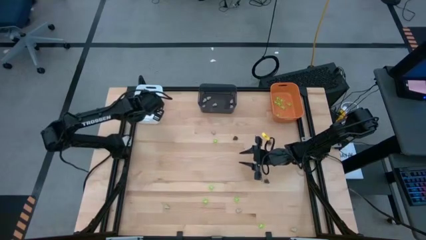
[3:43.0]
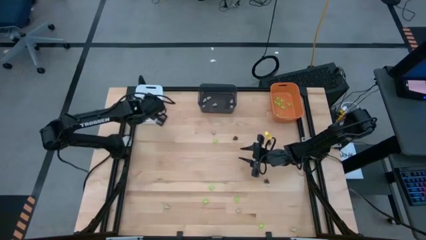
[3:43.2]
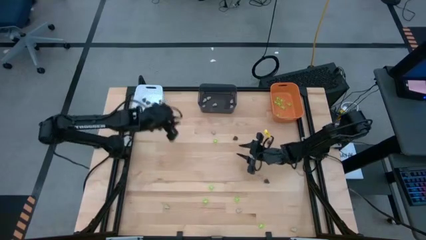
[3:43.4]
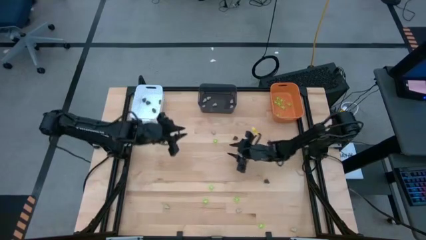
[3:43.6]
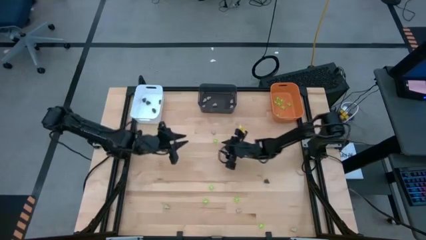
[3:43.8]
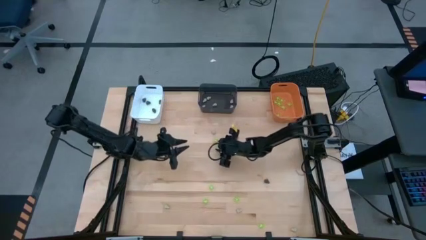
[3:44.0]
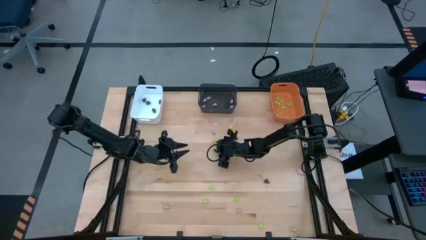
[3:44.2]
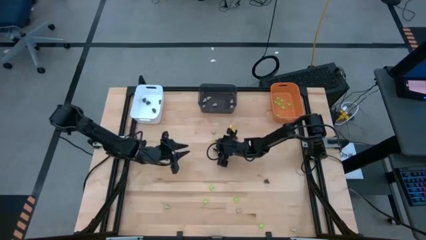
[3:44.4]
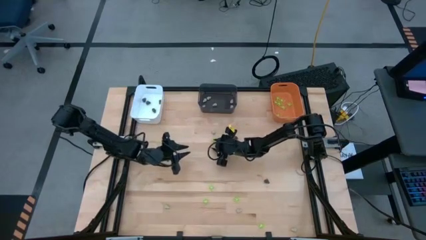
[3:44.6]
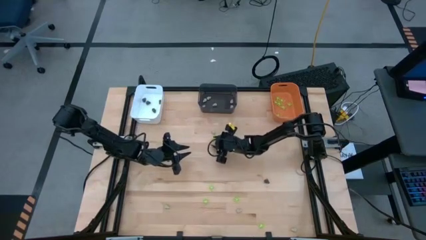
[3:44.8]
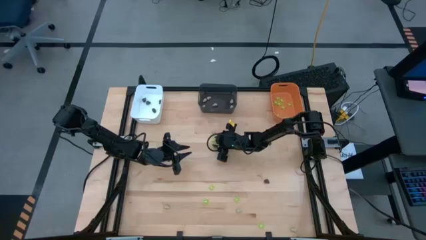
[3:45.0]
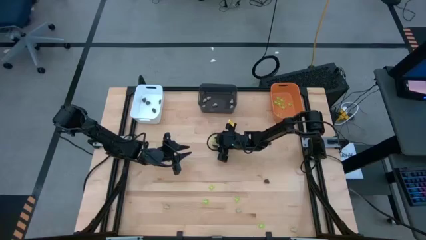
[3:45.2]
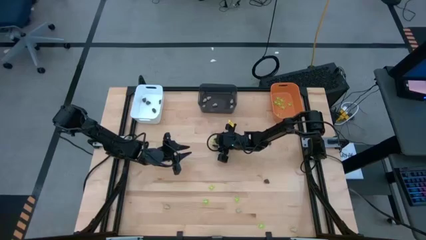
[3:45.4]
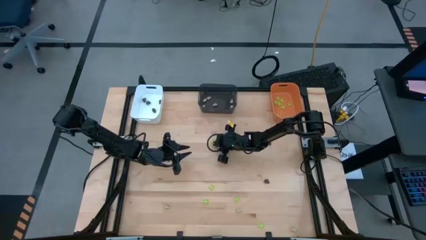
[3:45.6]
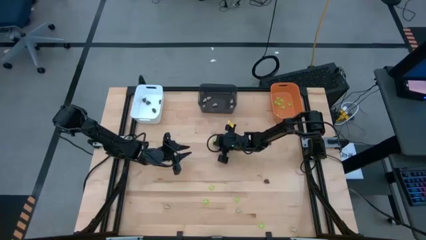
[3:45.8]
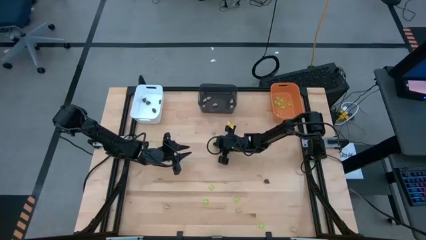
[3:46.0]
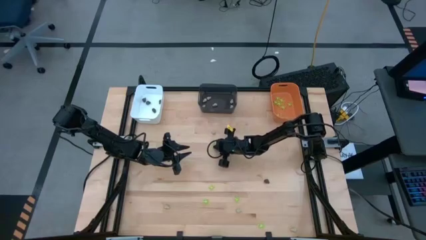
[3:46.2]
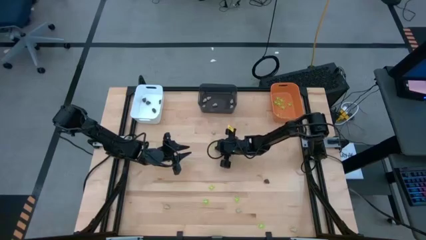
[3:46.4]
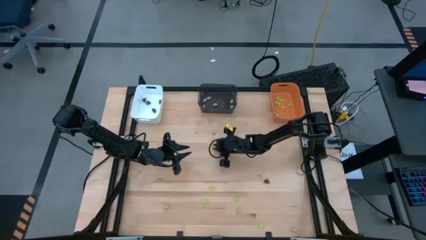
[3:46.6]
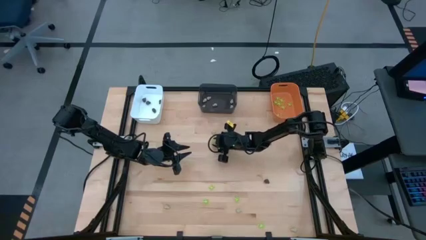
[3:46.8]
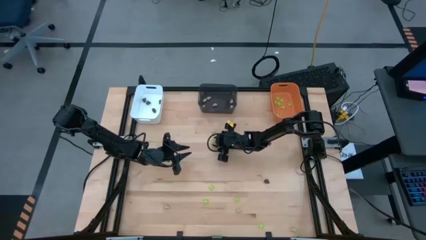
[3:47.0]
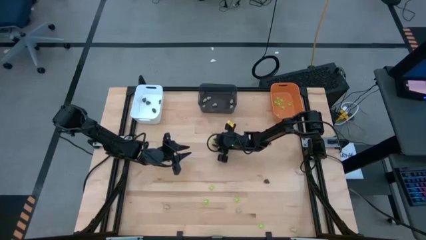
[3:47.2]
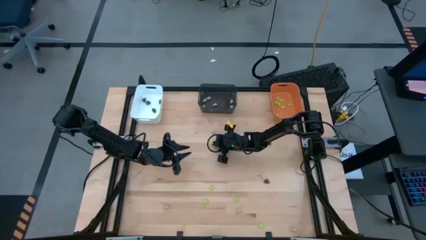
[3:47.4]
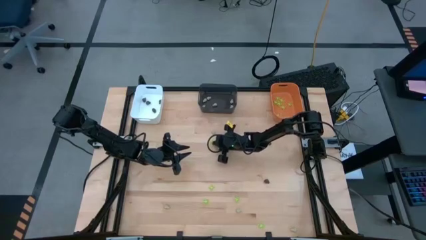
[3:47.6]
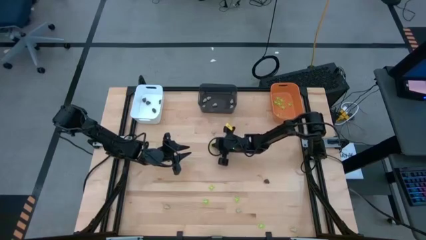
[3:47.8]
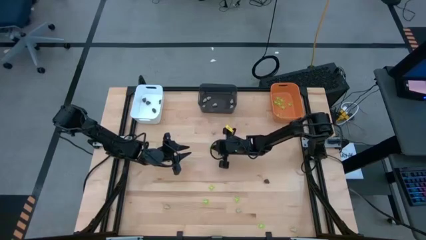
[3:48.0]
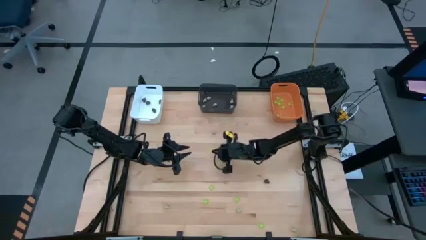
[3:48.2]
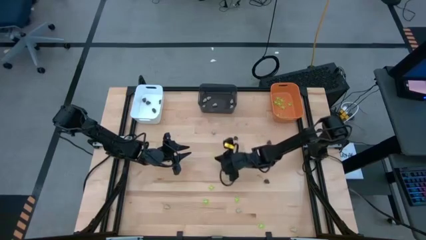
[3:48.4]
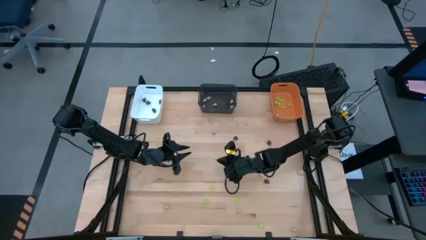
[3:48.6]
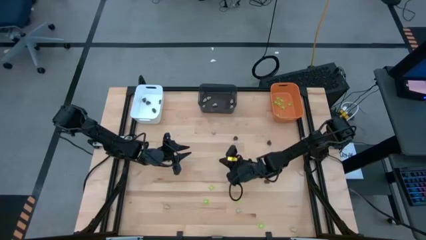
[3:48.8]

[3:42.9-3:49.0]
Task: Sort Halloween decoration
Put the green toy spider into the orange bin

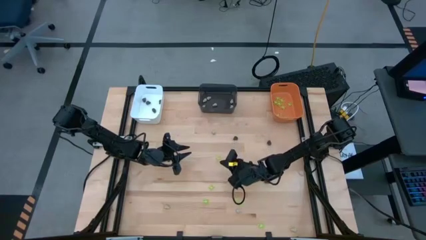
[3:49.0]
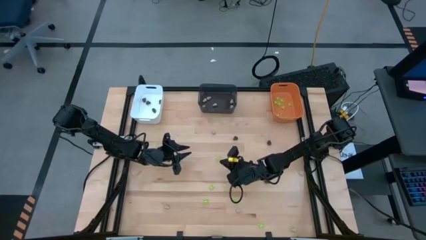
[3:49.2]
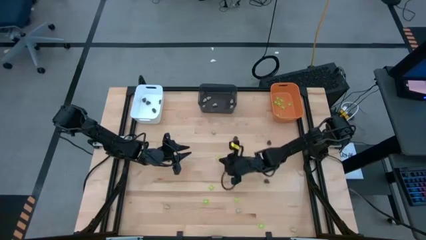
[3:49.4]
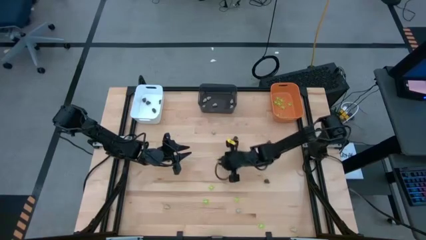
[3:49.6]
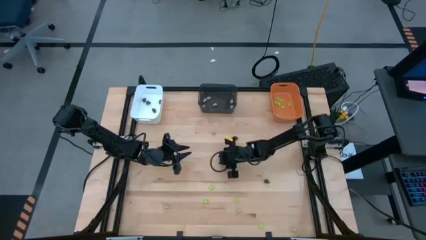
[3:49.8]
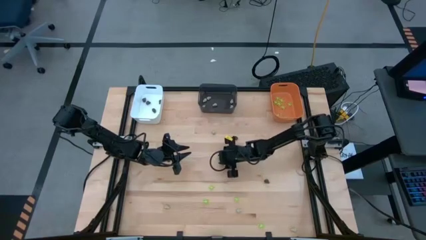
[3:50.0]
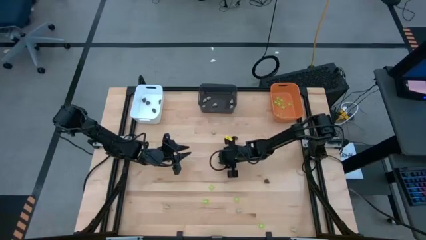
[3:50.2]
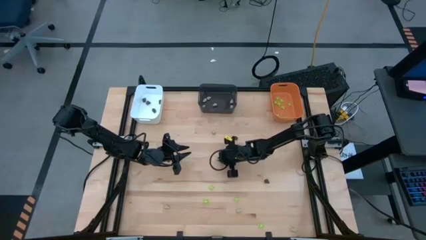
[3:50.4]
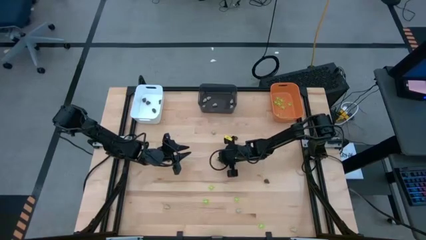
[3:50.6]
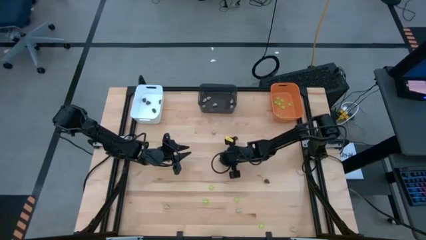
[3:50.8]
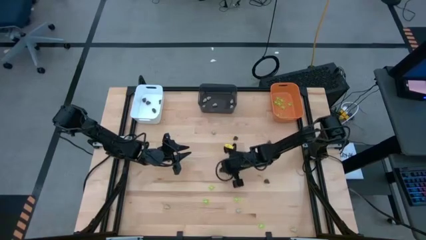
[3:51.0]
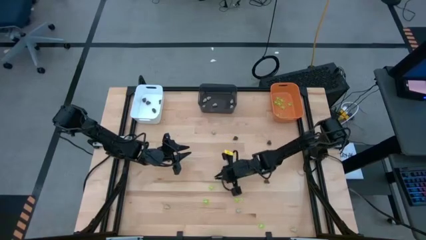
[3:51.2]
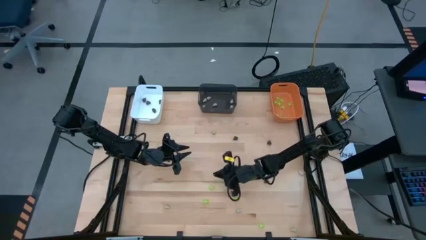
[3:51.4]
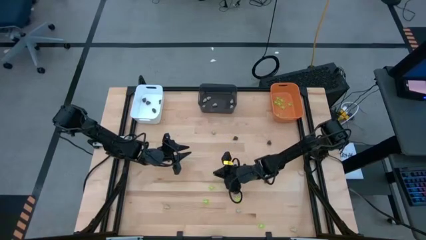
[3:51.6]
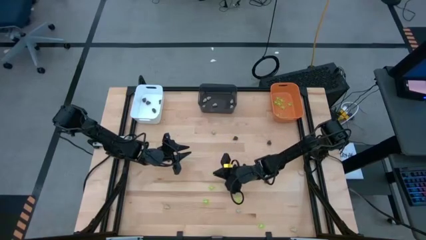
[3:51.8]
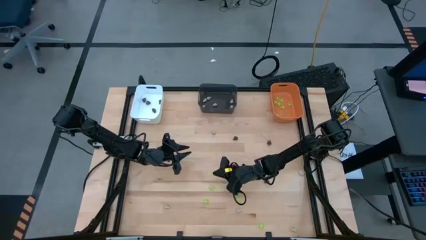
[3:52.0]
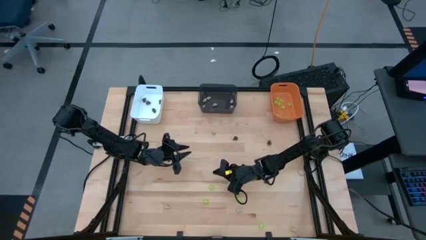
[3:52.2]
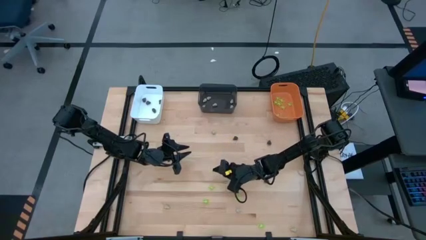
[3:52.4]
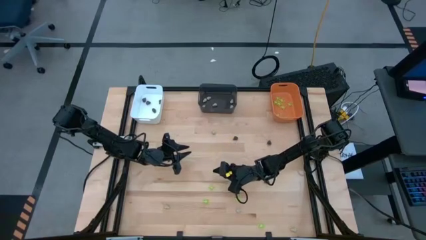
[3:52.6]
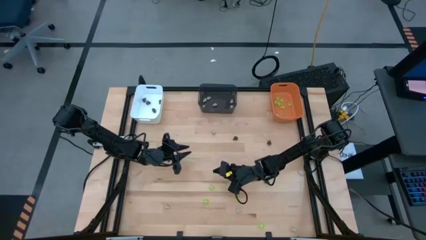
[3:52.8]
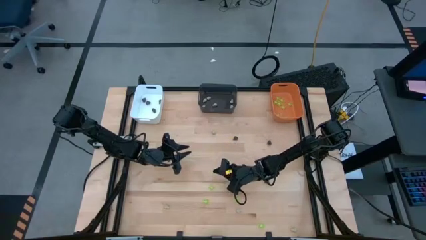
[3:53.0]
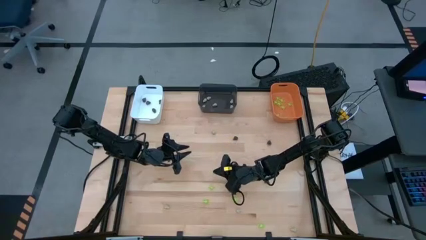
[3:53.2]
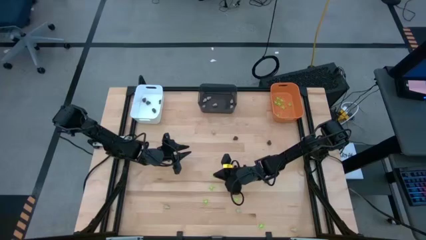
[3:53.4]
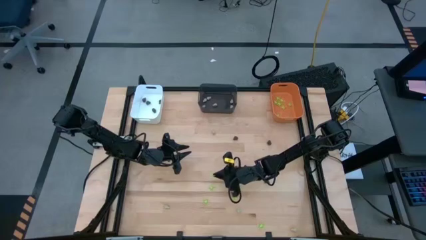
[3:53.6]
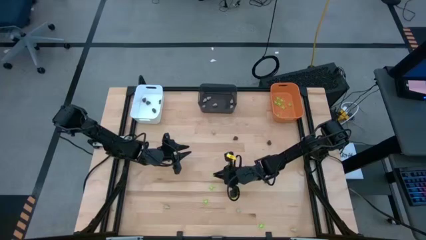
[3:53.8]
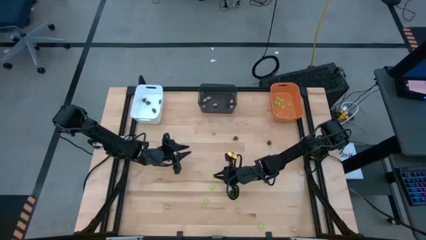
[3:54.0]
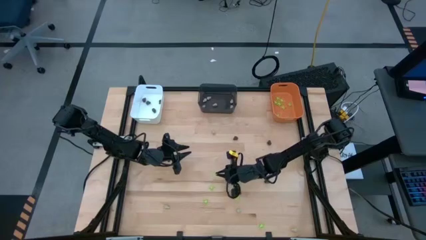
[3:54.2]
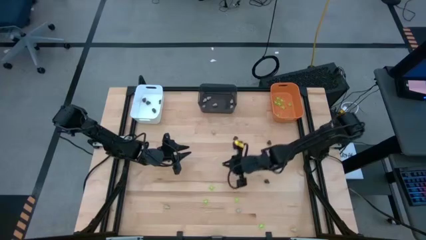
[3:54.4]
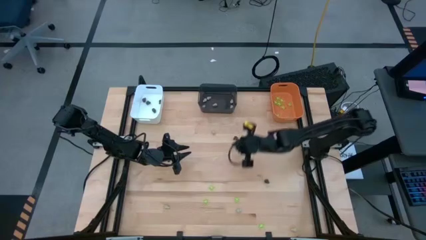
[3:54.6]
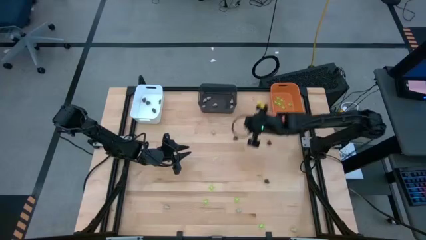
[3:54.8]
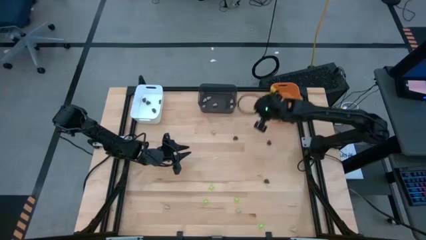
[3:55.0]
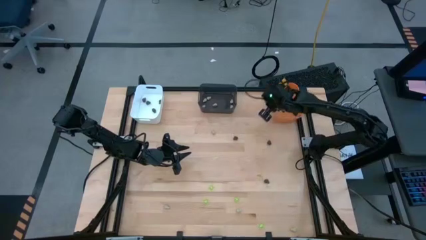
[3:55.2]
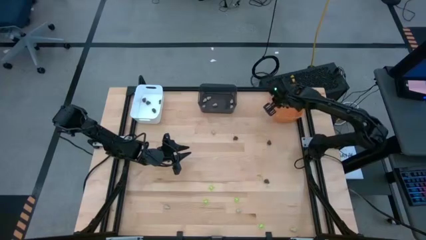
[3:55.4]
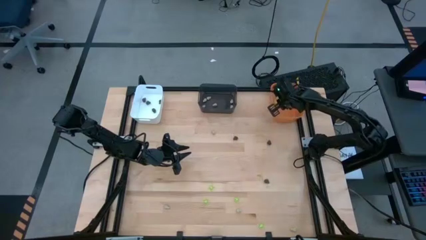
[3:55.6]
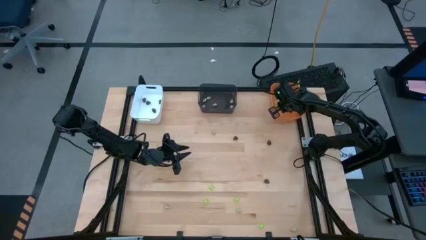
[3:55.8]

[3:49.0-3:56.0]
Put the green toy spider into the orange bin

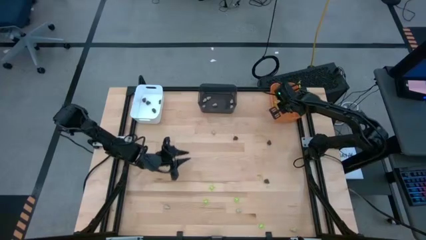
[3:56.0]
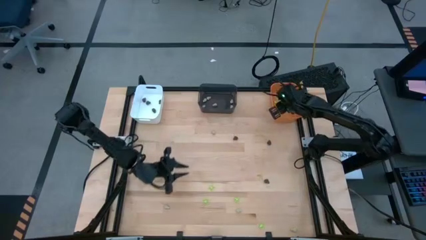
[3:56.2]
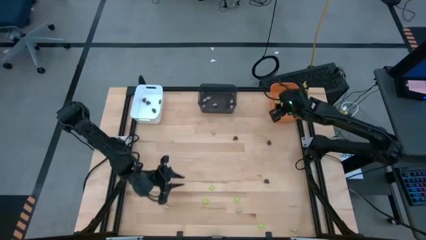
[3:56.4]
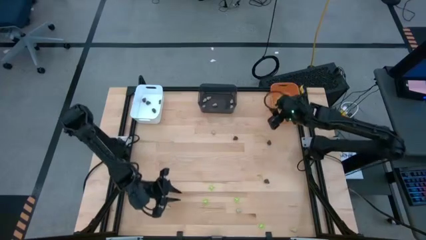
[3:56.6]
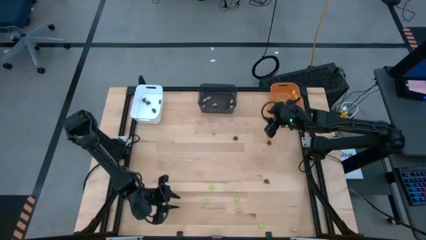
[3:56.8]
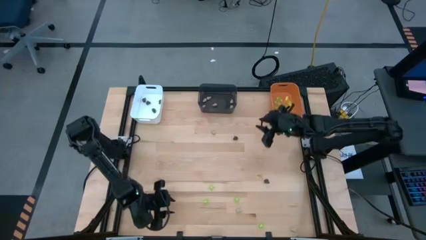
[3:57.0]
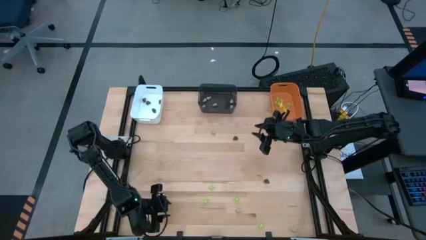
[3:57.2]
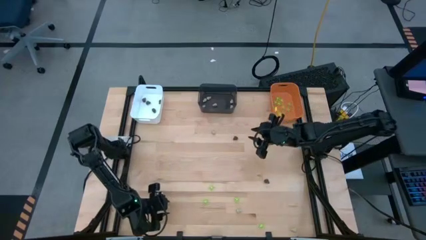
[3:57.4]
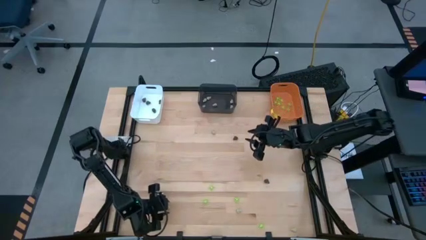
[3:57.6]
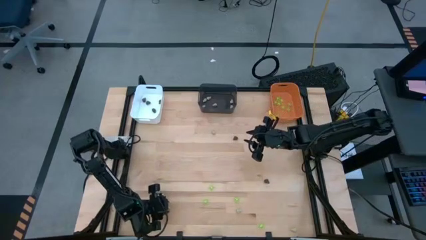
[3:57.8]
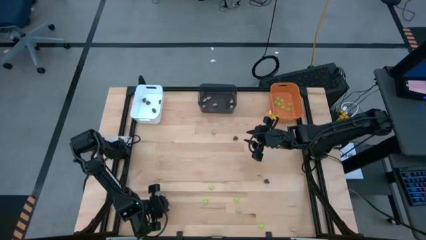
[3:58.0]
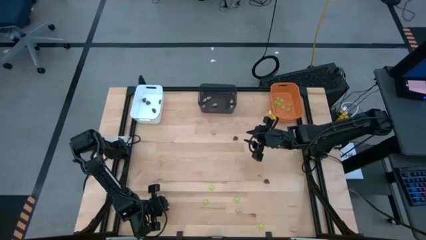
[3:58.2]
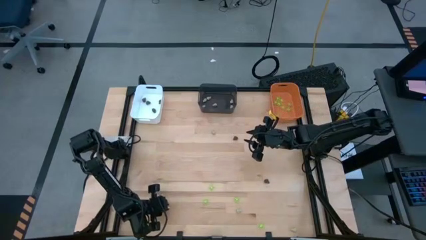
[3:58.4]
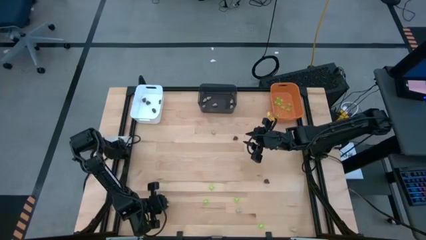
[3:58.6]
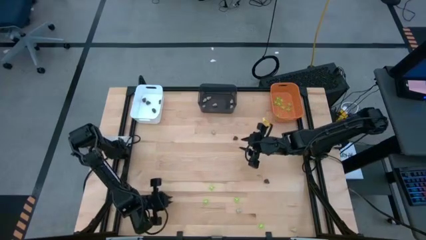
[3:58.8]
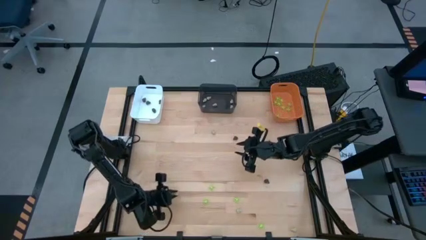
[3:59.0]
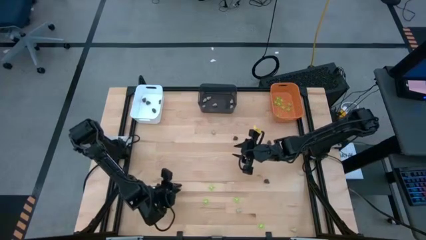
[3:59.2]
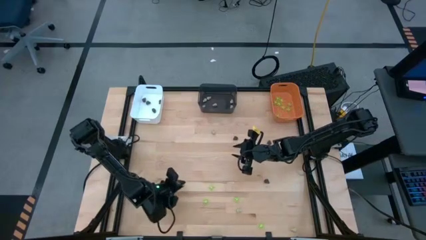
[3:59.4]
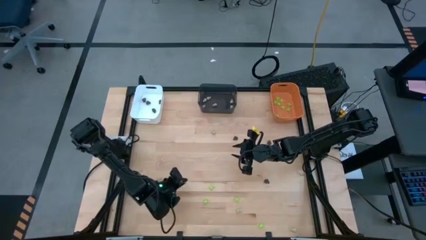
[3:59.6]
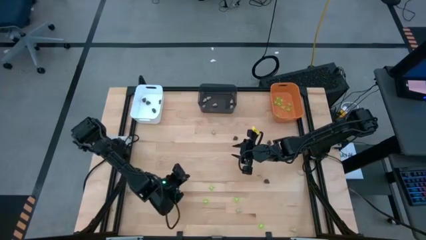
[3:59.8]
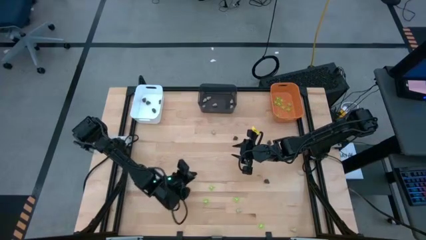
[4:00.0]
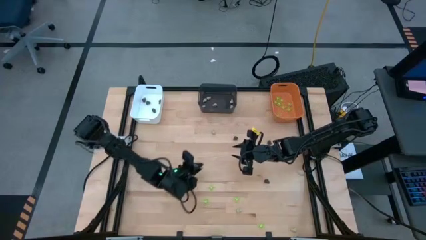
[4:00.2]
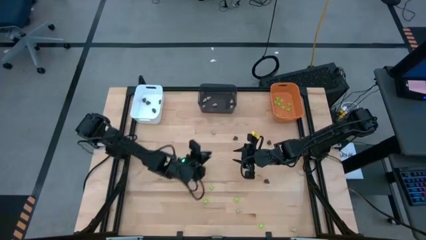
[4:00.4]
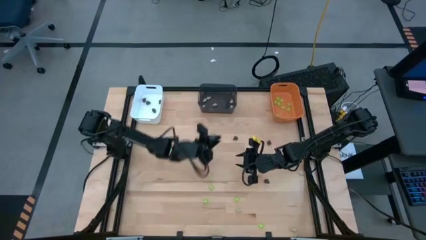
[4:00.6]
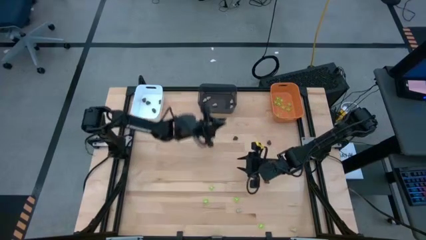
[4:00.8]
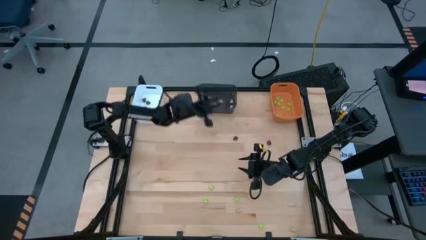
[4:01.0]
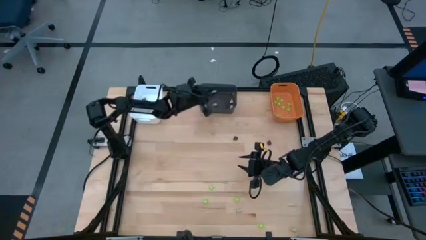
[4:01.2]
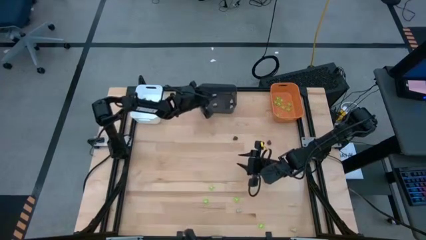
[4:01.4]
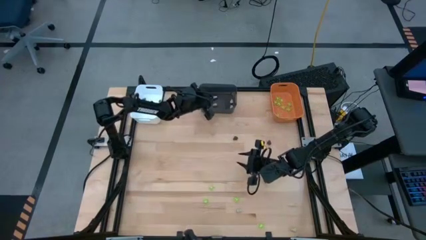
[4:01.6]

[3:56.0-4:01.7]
Put the white toy skull into the black bin
